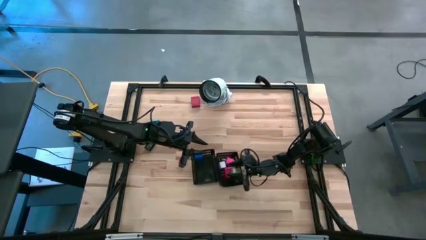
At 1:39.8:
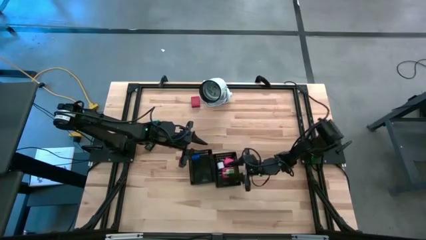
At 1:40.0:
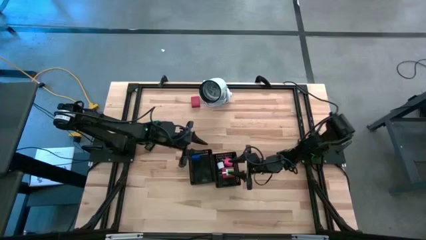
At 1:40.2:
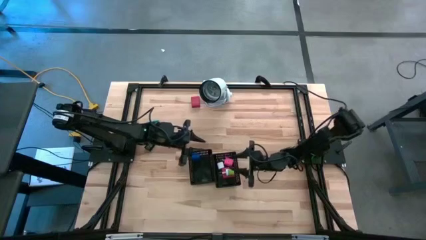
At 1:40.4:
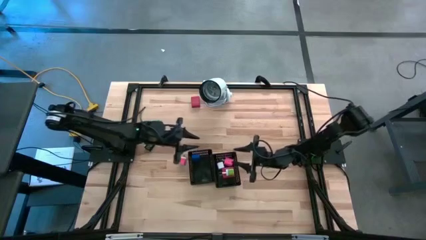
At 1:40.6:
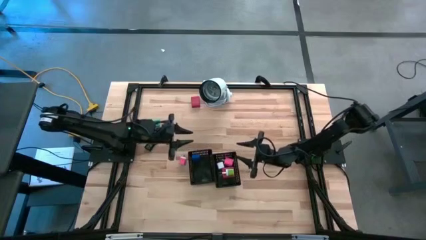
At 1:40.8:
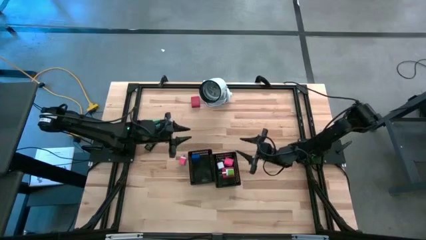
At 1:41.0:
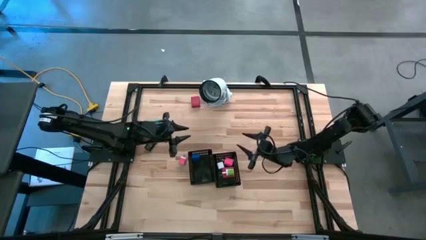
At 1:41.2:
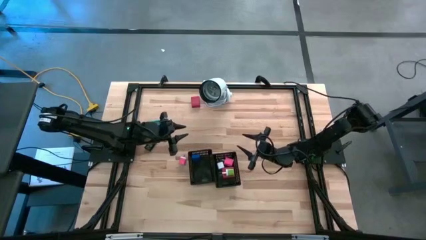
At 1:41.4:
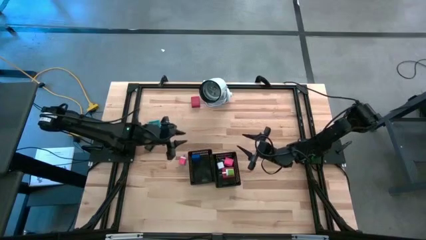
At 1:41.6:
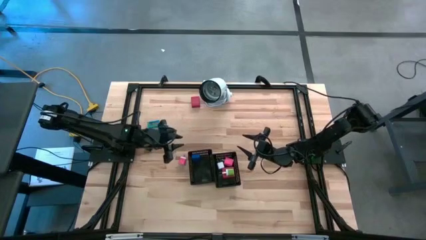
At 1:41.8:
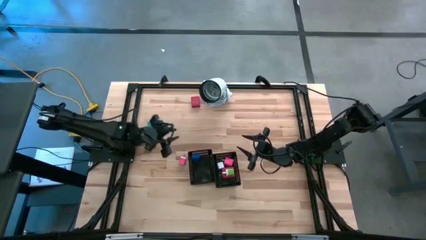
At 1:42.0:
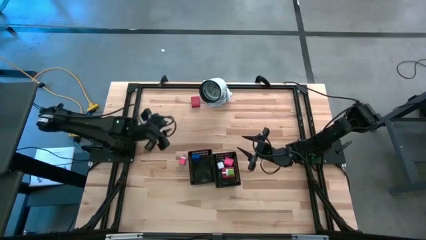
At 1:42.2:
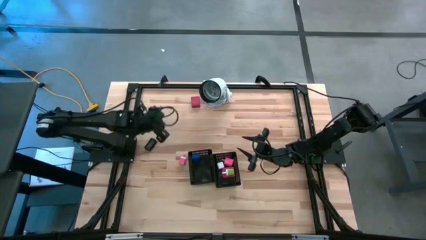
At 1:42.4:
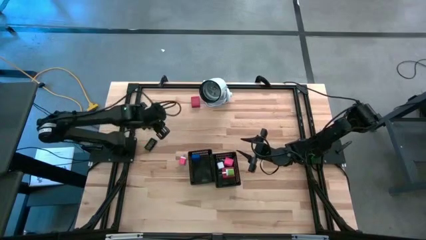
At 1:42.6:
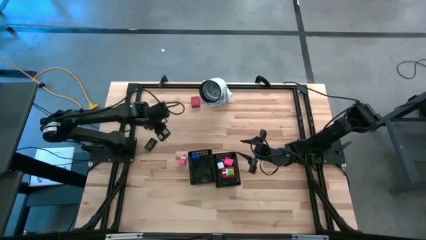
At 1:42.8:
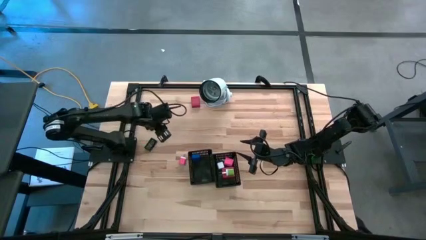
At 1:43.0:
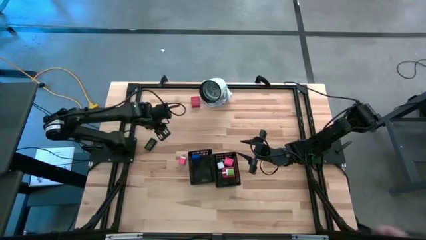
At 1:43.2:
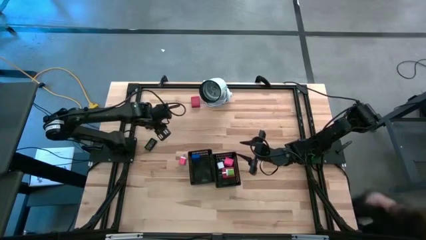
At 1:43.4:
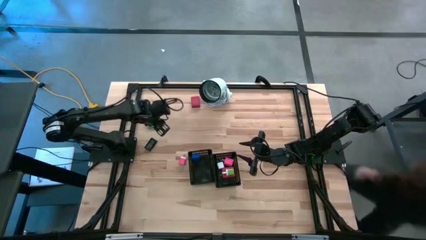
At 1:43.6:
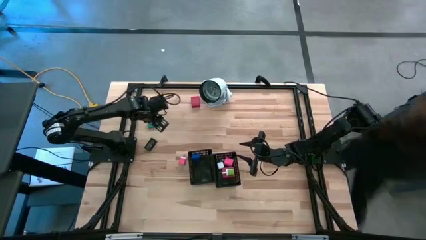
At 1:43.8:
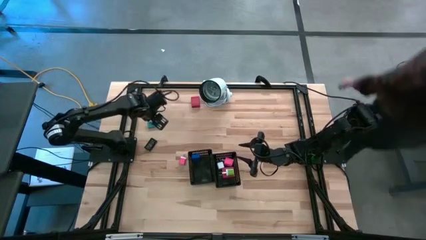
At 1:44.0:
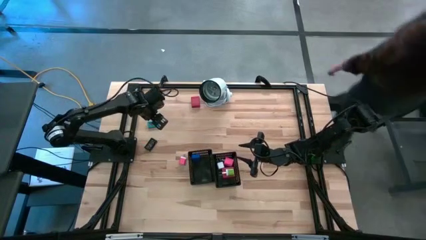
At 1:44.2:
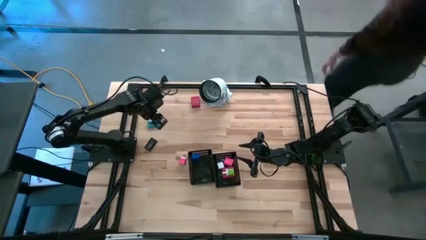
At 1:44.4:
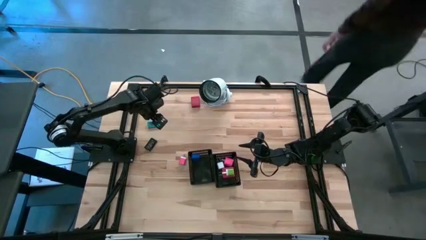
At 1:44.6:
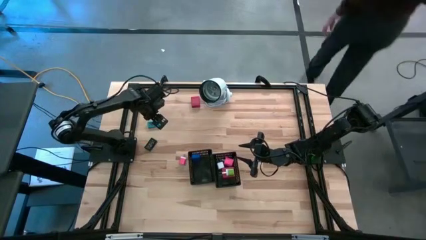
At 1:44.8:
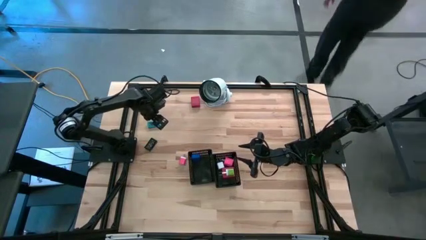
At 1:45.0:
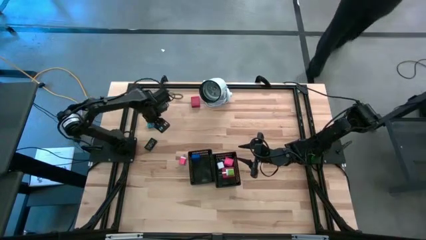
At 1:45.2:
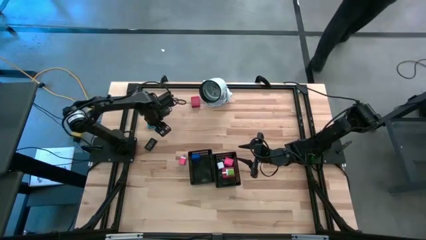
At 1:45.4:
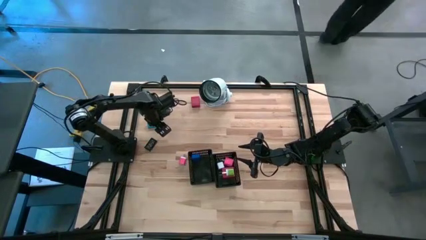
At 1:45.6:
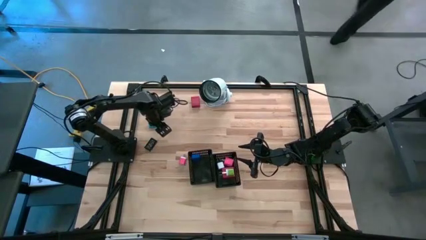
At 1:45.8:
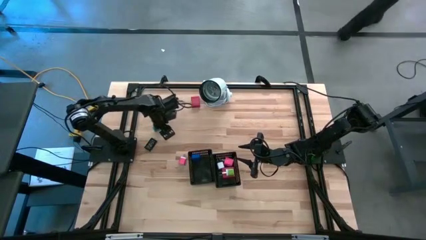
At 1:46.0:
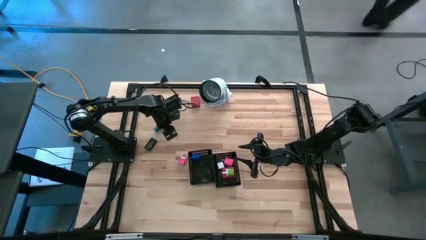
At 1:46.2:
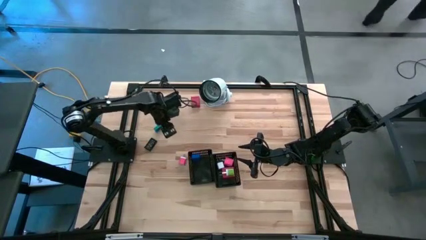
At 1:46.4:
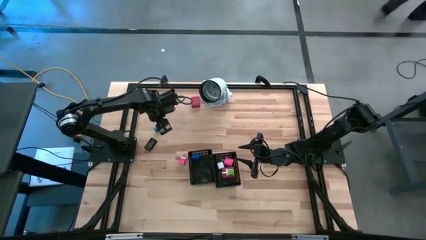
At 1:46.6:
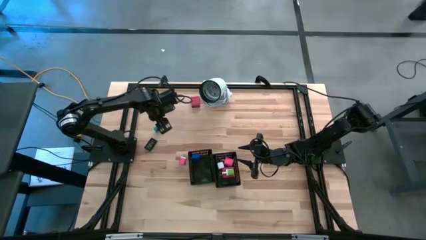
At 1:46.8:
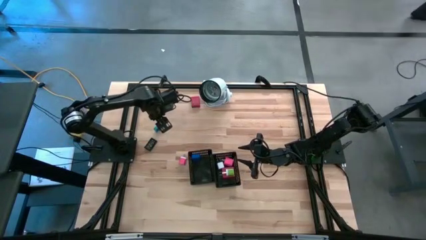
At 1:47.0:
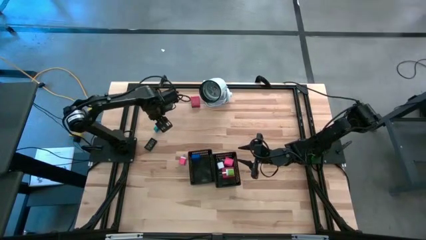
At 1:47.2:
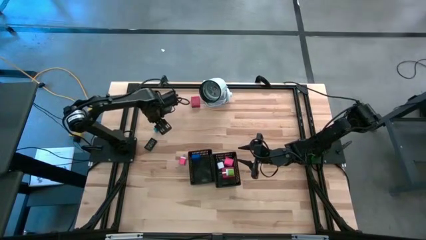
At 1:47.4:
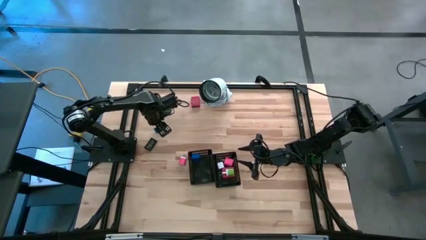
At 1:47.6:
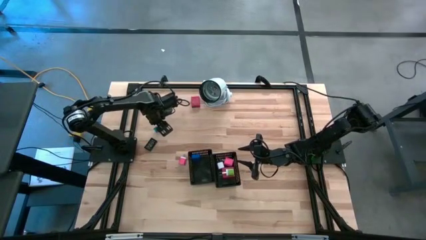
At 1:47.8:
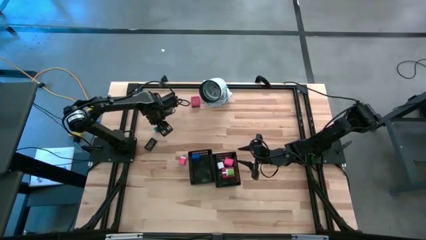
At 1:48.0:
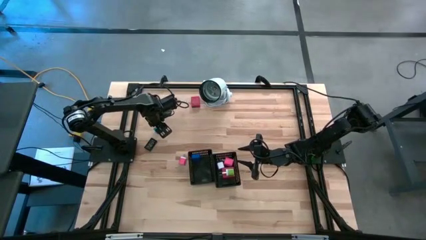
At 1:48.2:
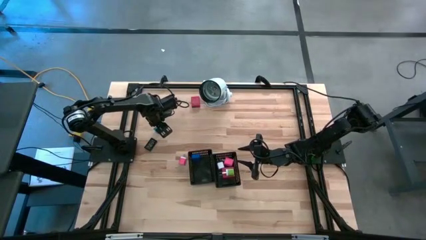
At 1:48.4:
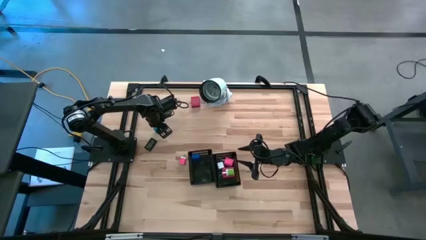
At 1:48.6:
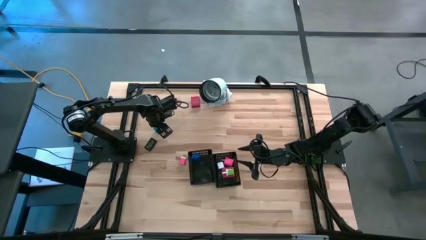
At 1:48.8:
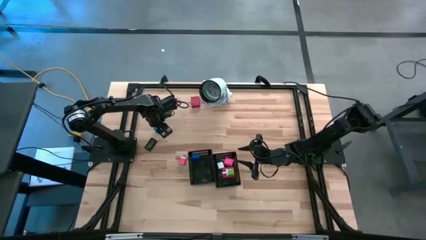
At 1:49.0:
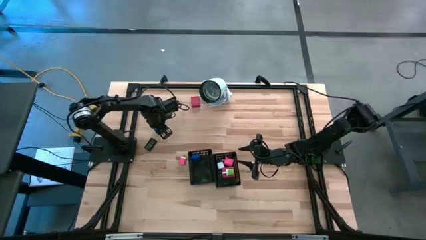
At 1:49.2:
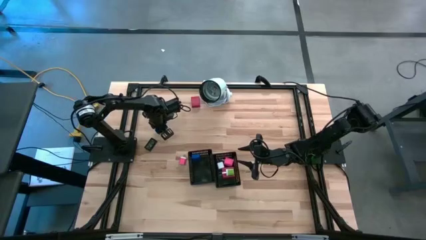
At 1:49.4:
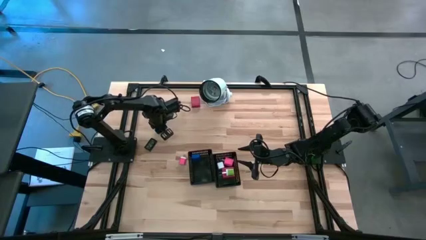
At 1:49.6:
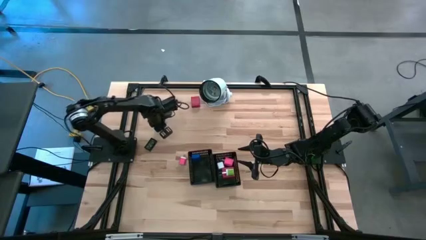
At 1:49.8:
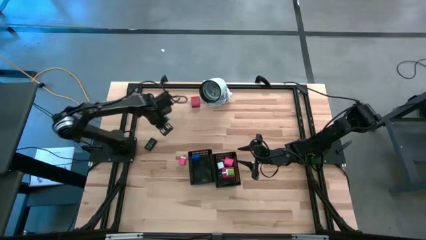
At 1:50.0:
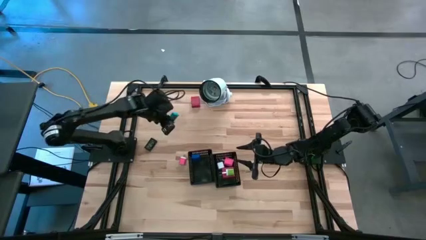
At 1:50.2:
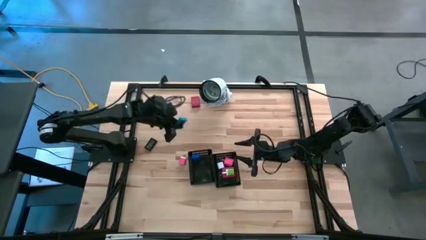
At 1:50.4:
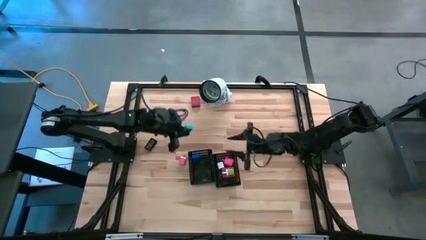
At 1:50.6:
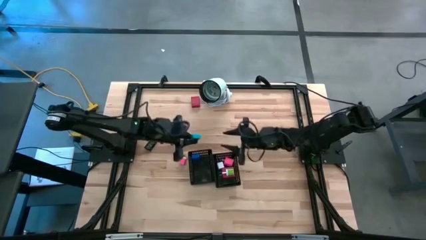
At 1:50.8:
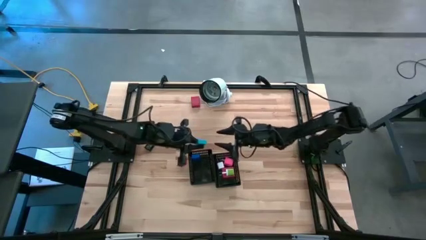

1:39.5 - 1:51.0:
Task: Pick & Place Office items
Put the light blue digital clock into the left black bin

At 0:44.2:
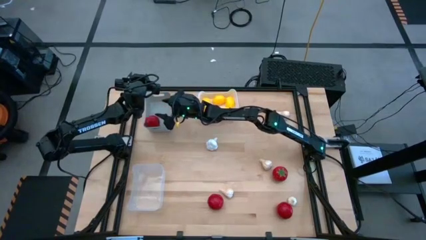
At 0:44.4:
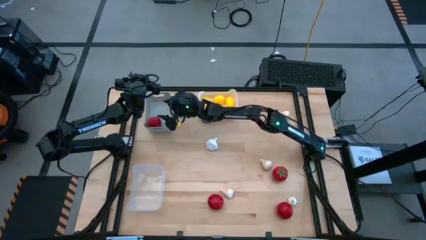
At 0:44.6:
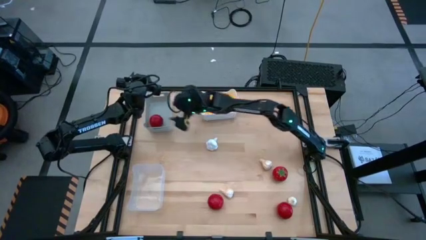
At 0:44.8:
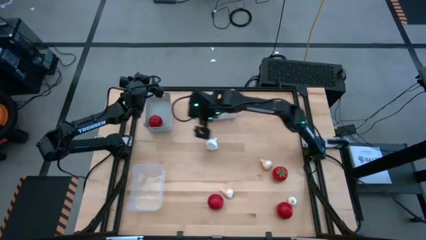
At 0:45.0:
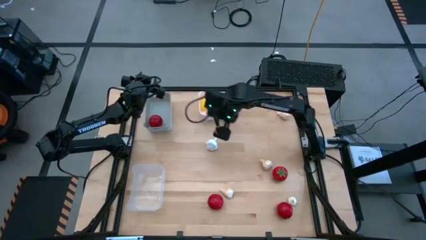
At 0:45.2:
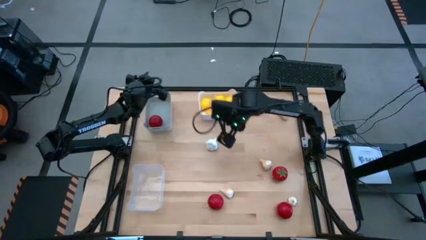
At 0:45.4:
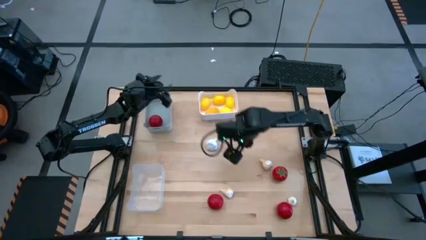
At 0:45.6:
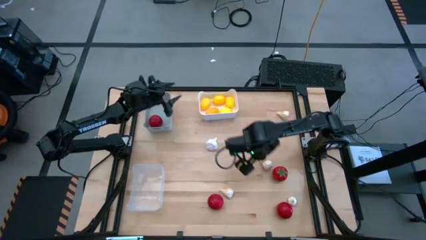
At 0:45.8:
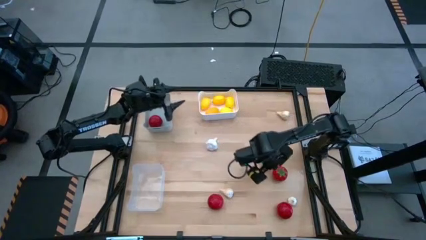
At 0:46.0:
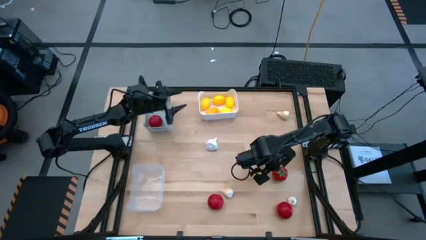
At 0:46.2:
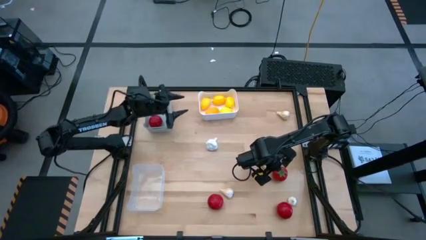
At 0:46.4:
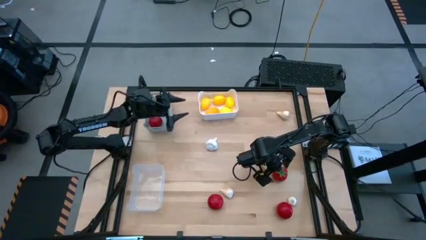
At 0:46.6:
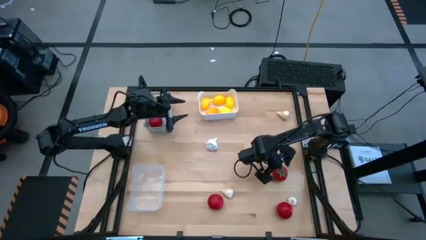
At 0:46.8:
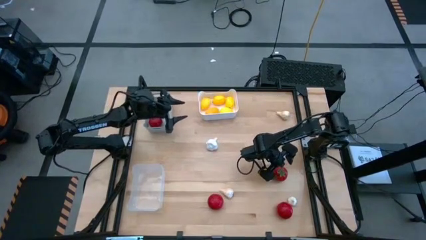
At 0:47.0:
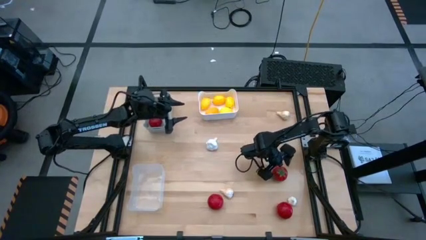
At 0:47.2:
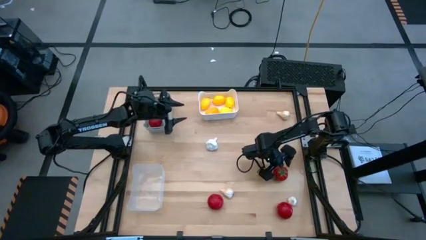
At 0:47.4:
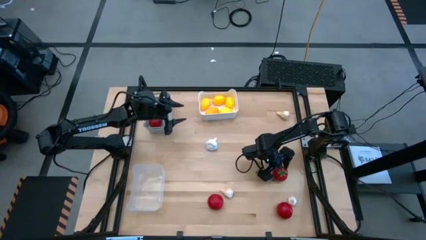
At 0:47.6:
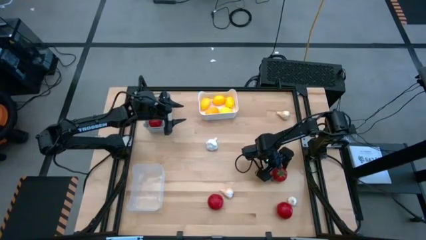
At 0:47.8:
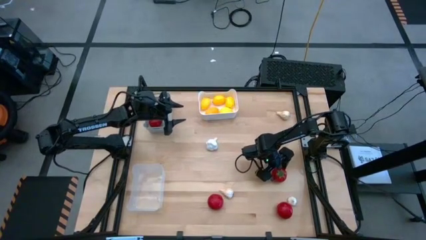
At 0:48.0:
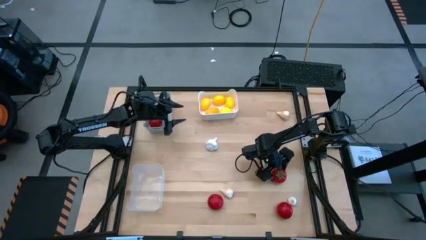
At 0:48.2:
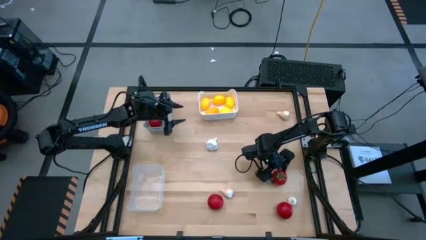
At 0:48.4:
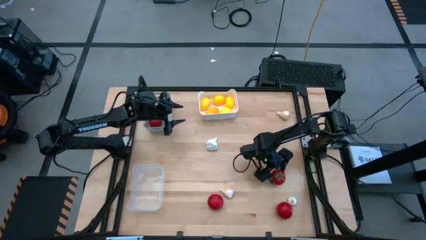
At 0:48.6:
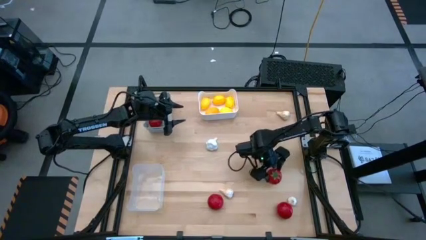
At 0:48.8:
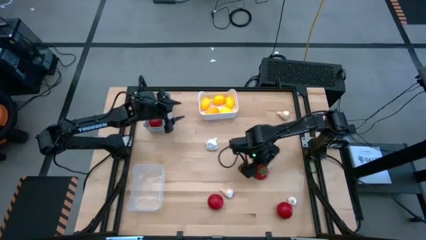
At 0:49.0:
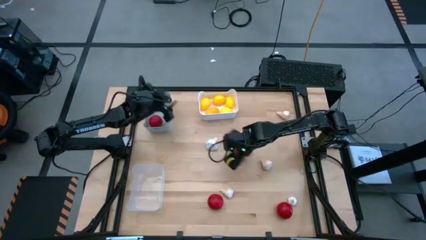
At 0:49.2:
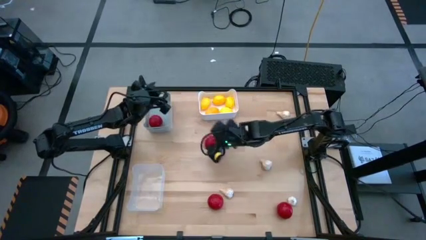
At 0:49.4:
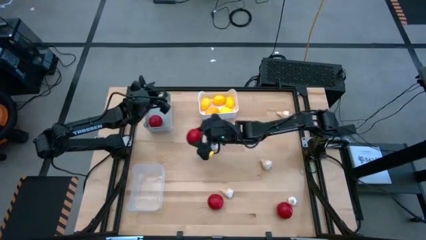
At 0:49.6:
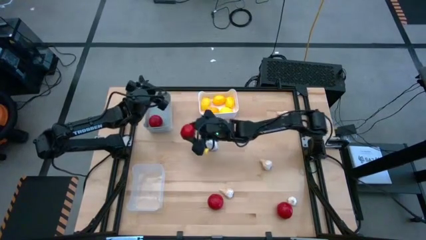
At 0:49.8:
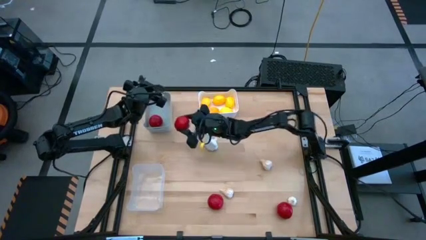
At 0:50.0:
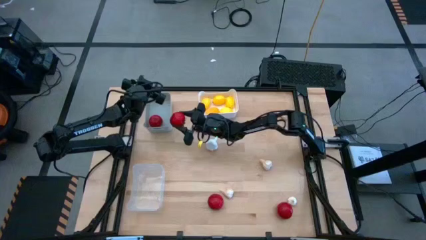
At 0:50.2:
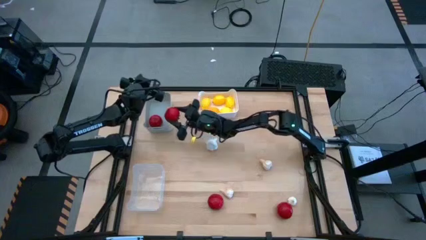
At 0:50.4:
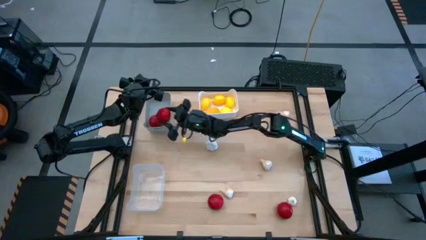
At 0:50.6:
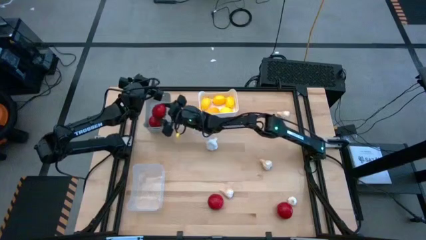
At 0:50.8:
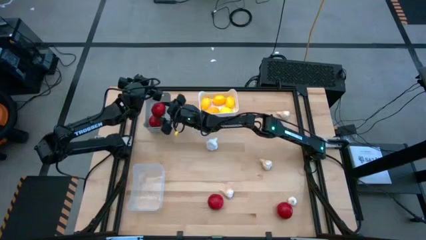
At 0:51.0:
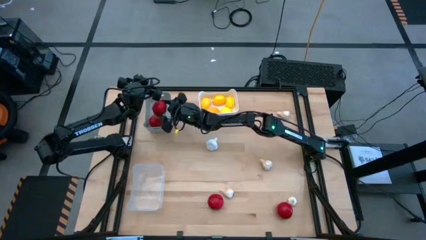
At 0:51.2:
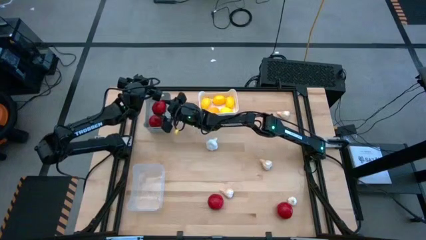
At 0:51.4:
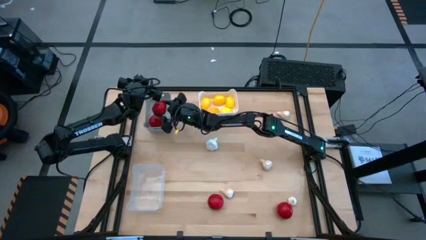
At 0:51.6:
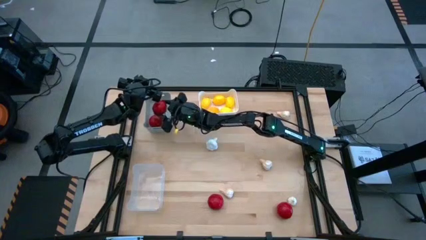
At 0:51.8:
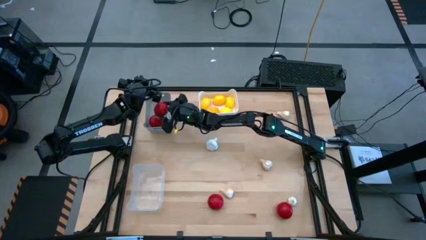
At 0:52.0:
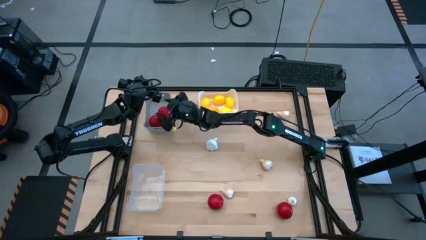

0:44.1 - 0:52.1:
Task: Sort produce into baskets
Put the tomato into the gray bin
